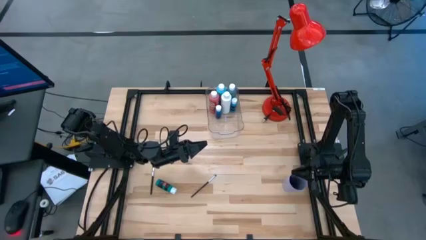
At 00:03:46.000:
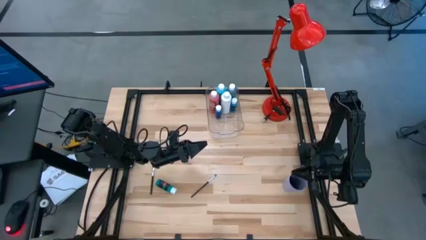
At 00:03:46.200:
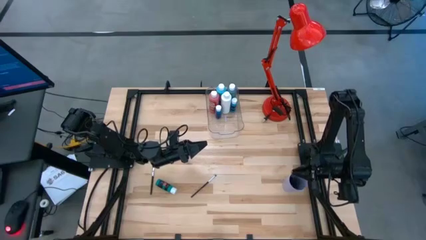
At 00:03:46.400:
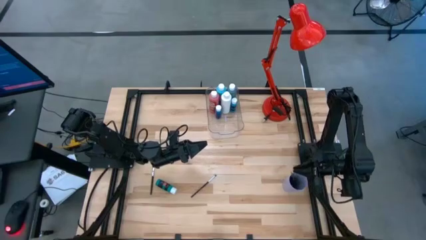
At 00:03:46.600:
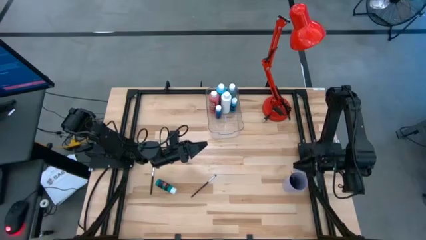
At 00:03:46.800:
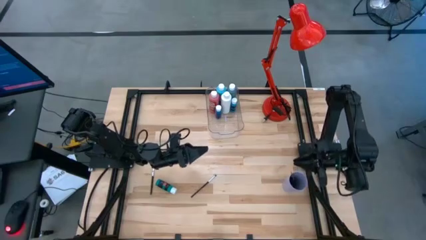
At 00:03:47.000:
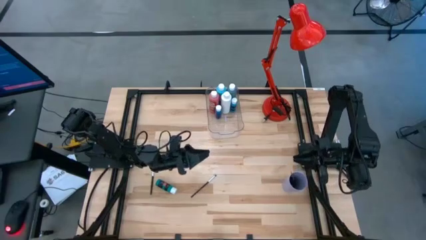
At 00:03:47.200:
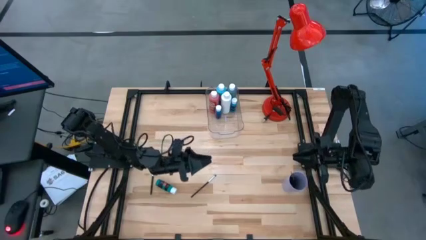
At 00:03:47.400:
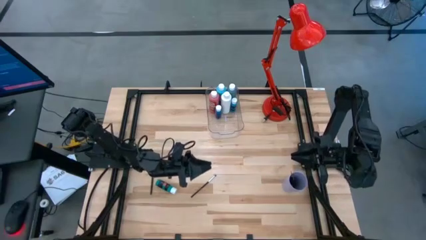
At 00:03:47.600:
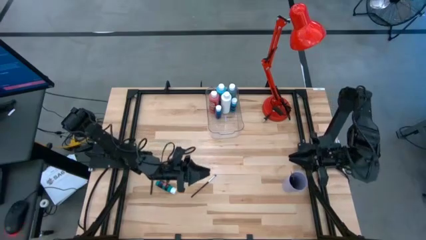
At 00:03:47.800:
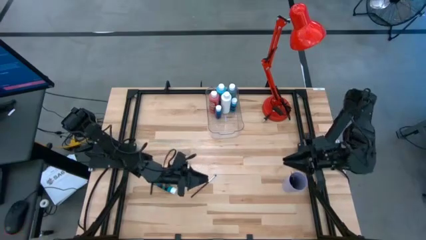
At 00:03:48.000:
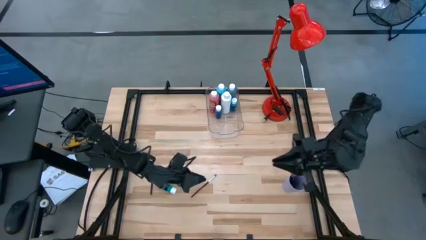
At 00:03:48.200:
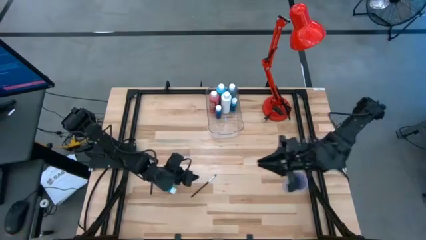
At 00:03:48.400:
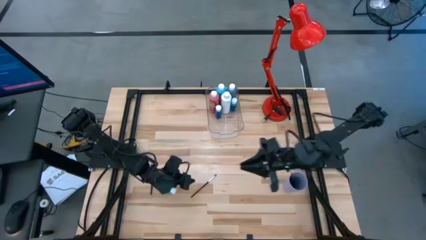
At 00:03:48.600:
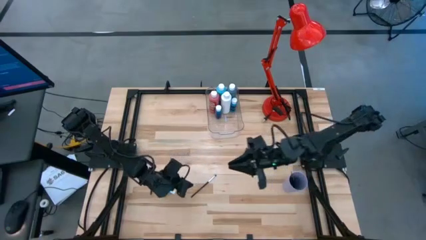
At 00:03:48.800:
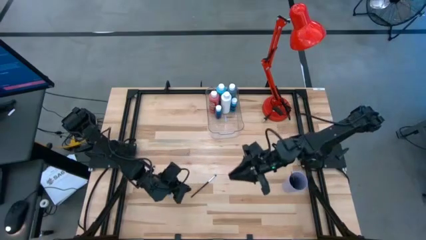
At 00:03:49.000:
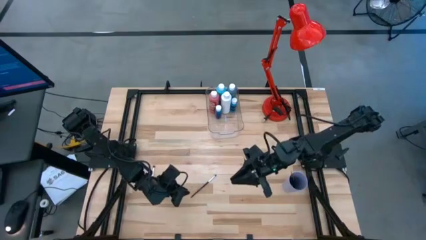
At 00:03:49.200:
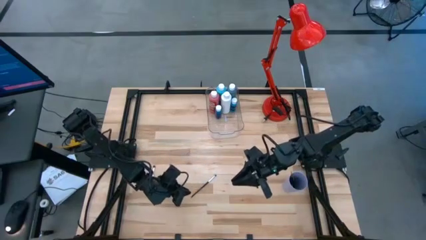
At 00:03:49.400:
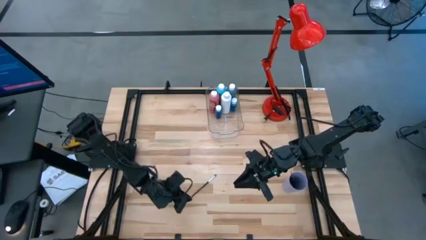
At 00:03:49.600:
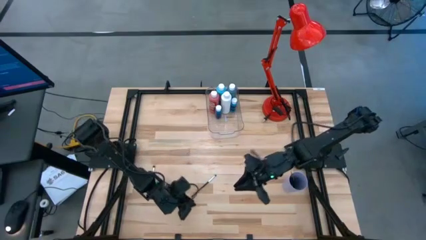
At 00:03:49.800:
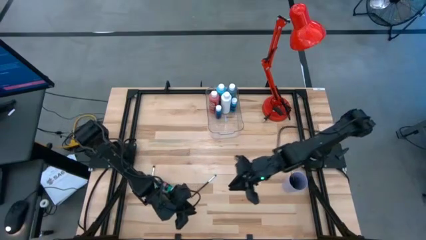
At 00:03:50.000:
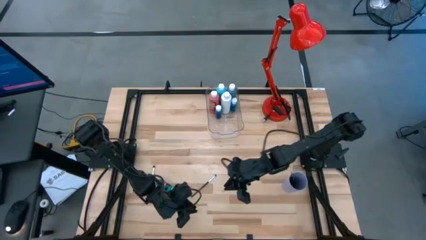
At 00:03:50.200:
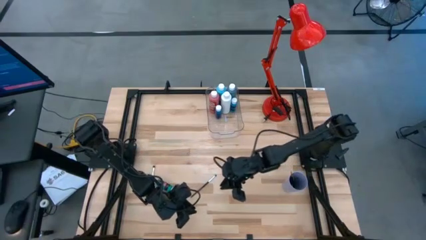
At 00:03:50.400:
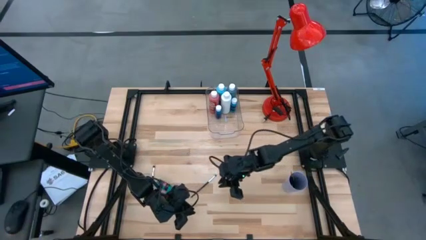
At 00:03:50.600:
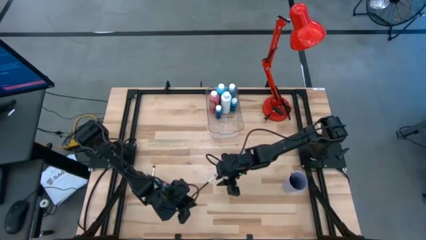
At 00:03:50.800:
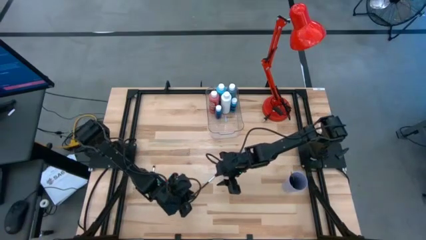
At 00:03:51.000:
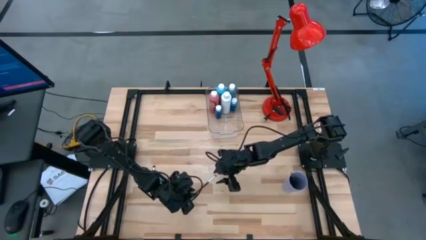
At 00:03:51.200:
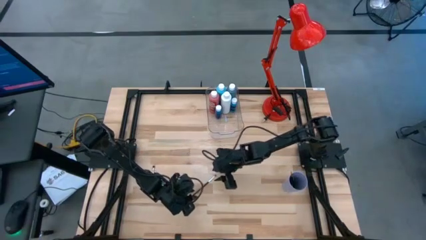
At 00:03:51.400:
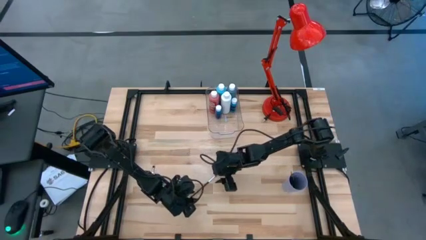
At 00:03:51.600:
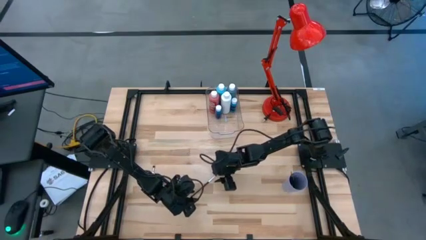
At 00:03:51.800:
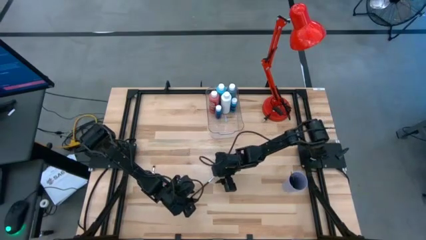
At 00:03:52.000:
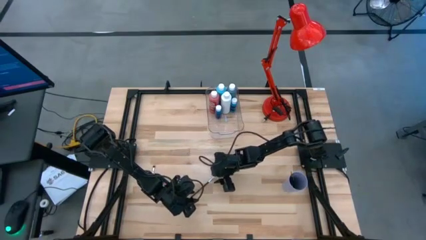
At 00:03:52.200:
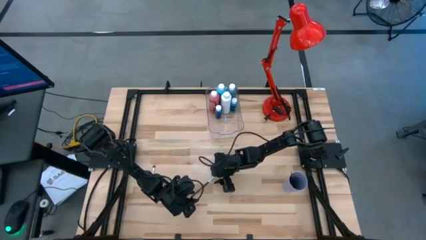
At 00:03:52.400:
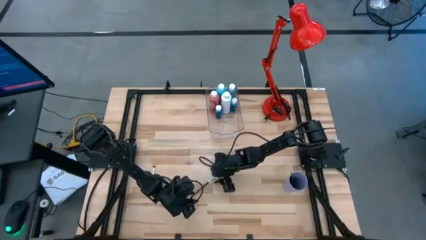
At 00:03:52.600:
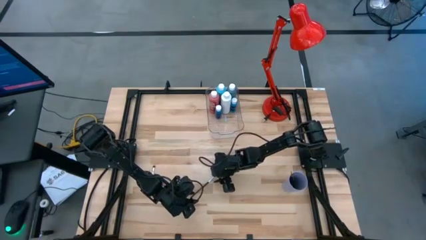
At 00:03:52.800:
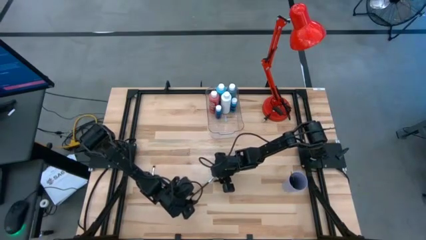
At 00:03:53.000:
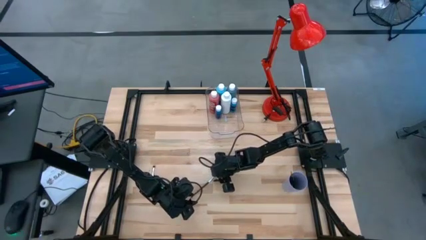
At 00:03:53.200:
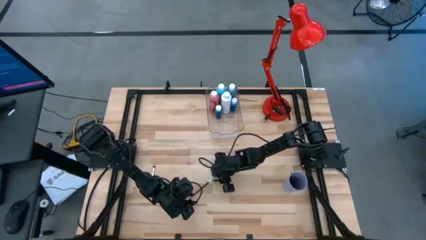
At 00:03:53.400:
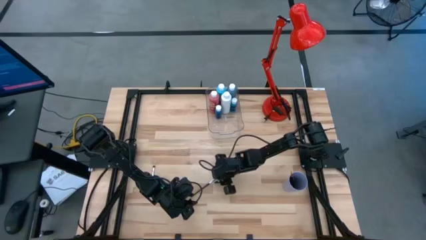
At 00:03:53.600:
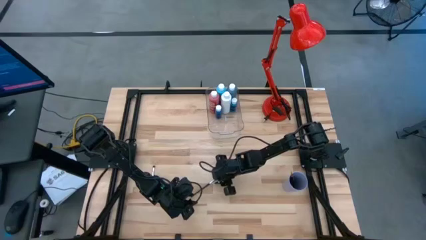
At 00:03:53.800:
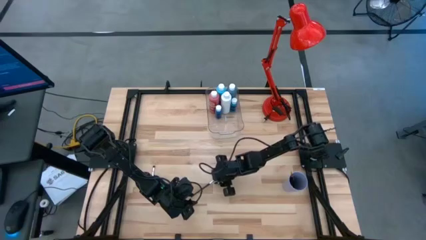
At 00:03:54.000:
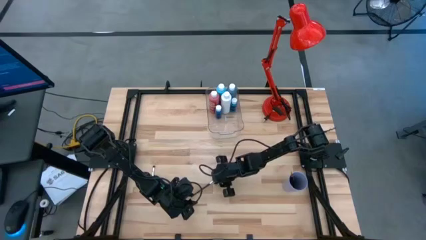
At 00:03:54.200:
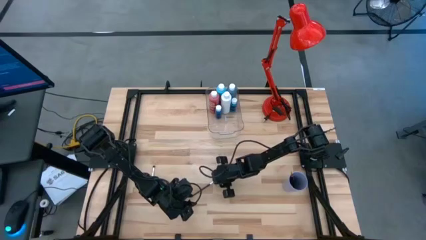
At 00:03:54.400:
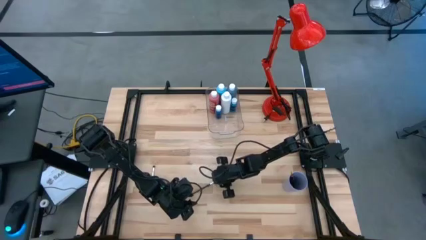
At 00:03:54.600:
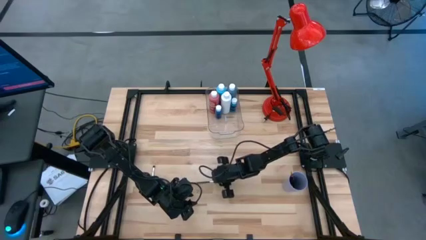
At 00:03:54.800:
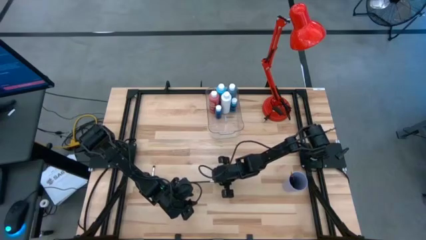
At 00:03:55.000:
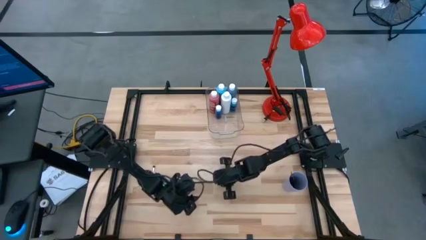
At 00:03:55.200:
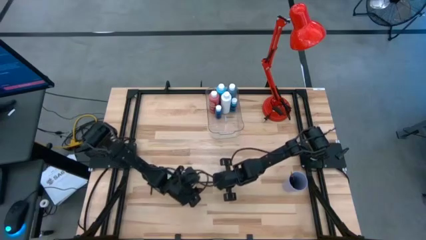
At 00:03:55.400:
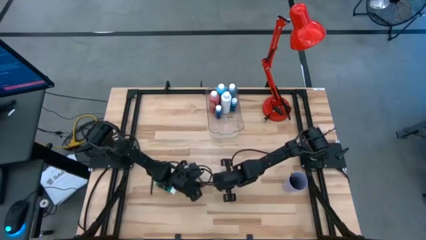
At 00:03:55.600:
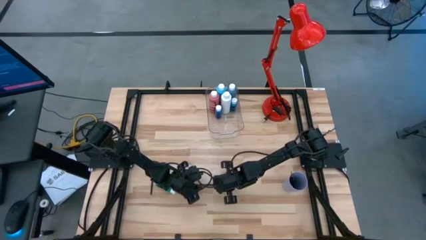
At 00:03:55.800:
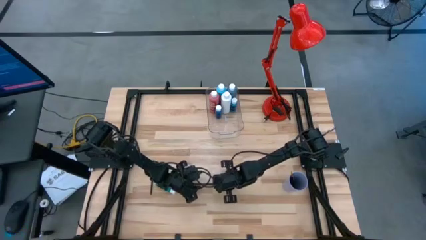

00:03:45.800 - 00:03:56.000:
Task: Pick & Place Paint Supplies
Put the silver paintbrush into the purple cup

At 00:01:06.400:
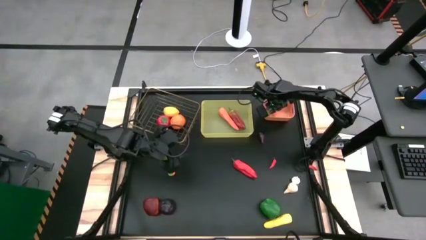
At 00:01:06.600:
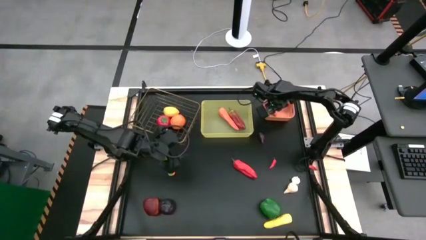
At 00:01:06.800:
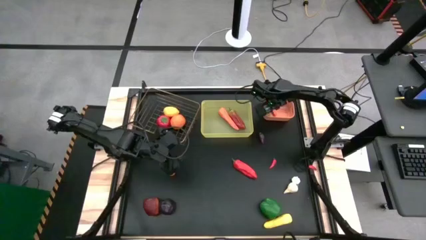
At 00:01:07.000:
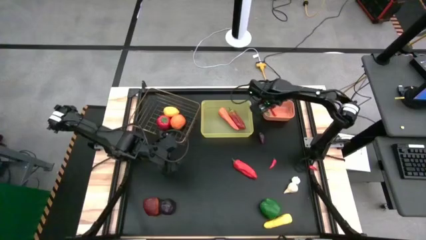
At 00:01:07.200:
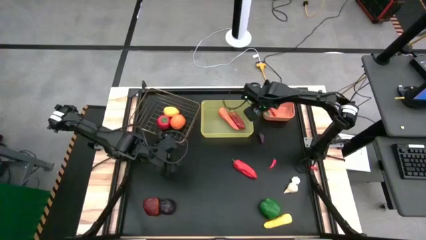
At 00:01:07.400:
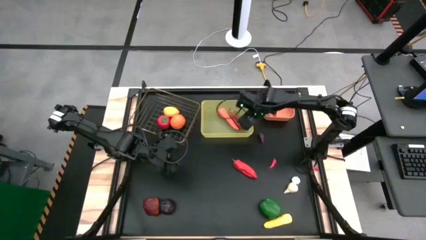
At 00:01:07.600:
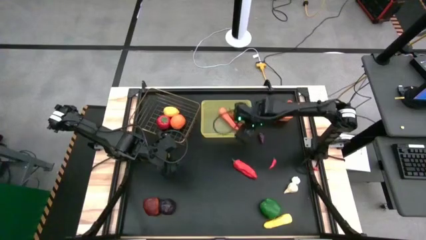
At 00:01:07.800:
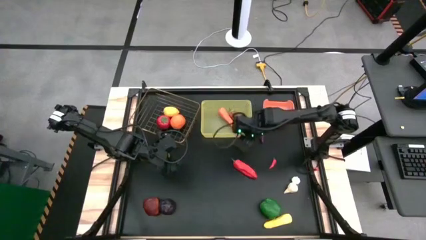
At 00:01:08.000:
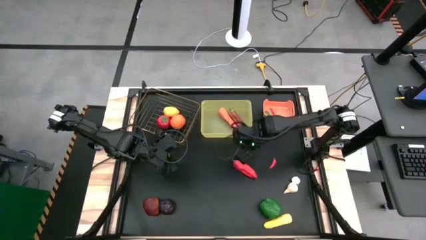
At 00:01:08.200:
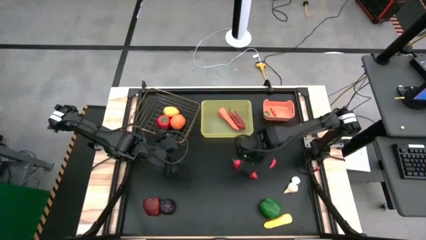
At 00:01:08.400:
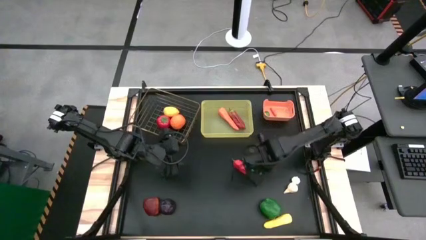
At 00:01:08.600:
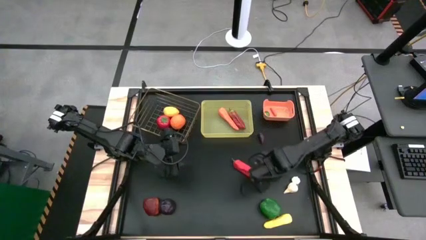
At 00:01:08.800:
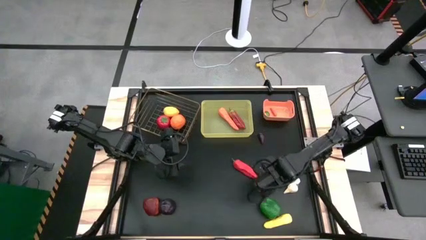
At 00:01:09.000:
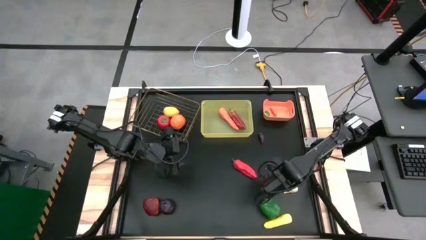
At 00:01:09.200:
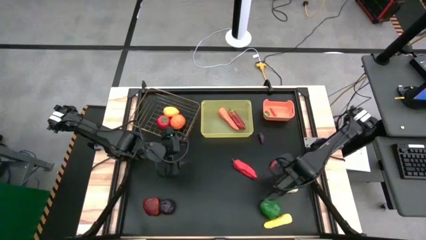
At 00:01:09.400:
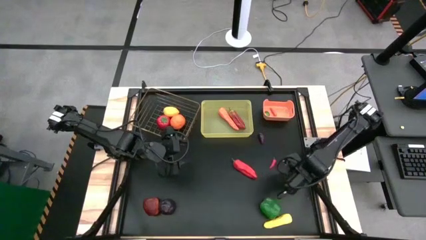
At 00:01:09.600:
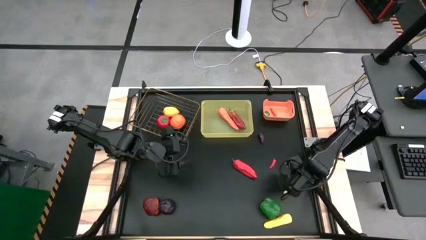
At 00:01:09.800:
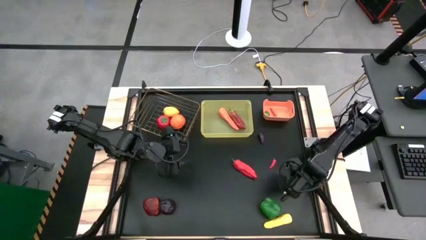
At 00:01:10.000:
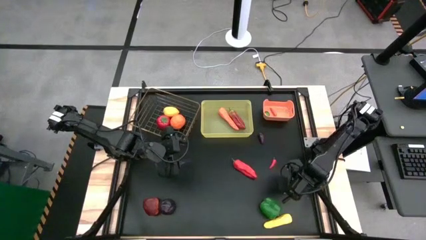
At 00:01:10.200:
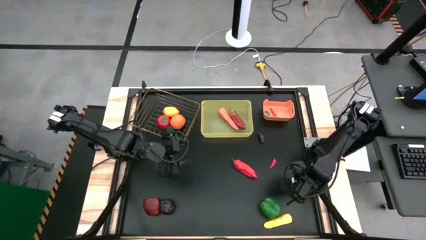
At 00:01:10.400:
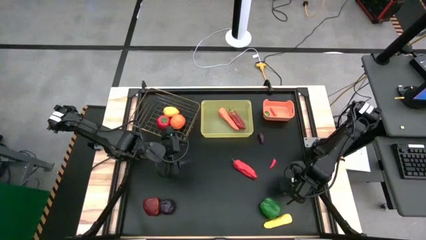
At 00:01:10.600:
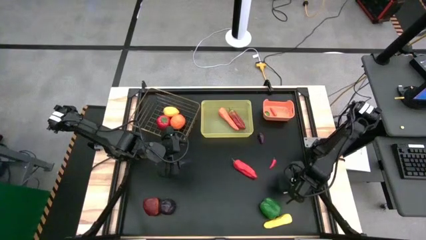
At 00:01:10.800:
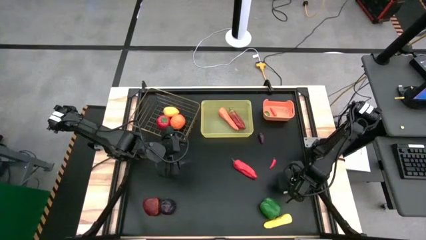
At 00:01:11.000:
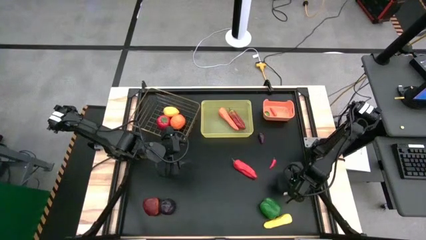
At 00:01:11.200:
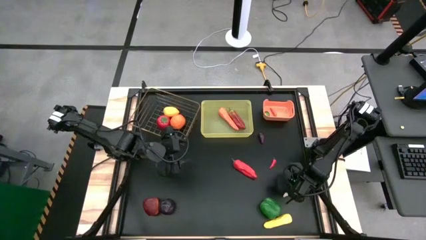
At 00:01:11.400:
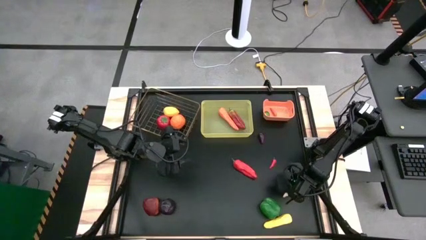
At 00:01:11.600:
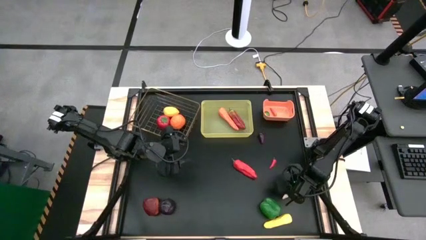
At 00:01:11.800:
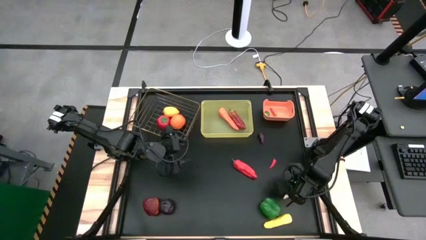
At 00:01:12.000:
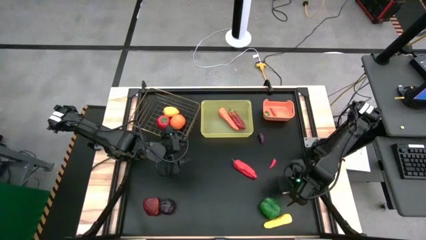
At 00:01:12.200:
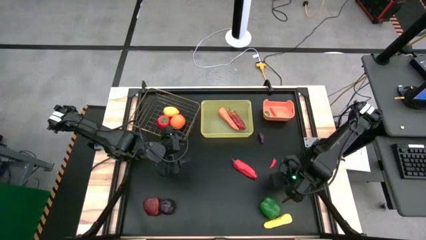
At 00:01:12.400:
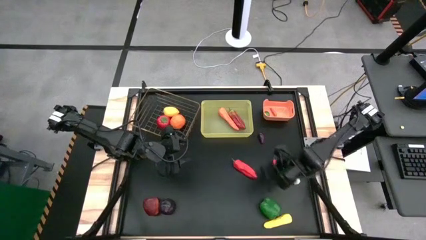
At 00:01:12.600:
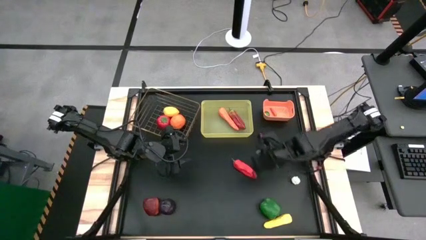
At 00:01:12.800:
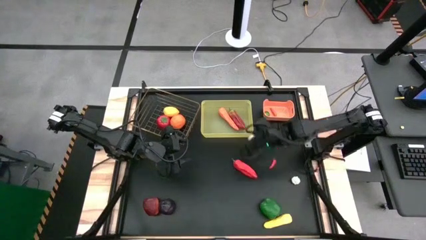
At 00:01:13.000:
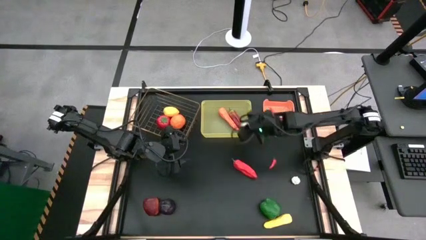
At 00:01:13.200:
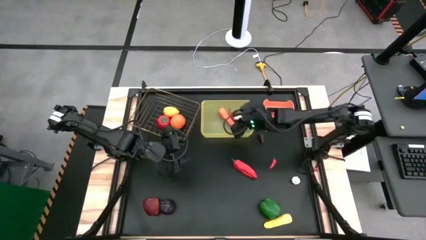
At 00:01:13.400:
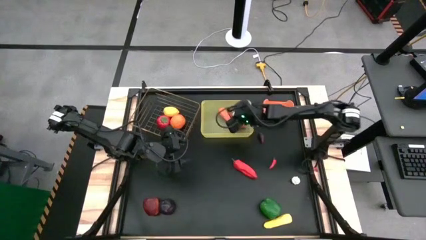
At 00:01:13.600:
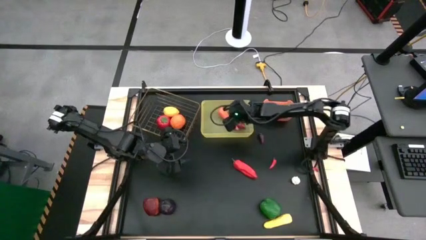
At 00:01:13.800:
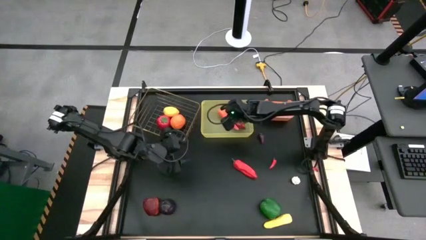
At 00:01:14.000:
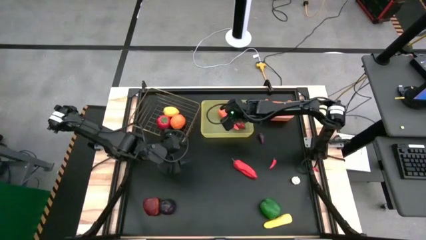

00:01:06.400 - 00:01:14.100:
Task: Sort produce into baskets
Put the onion into the yellow bin
